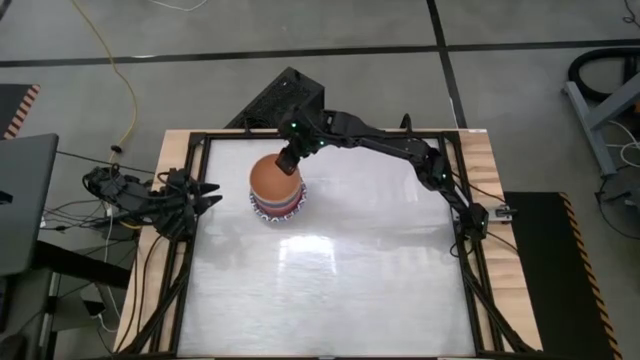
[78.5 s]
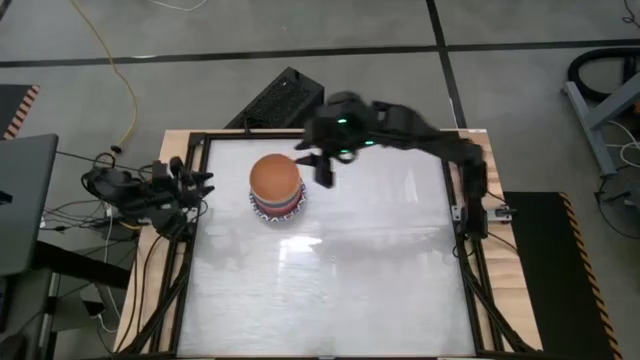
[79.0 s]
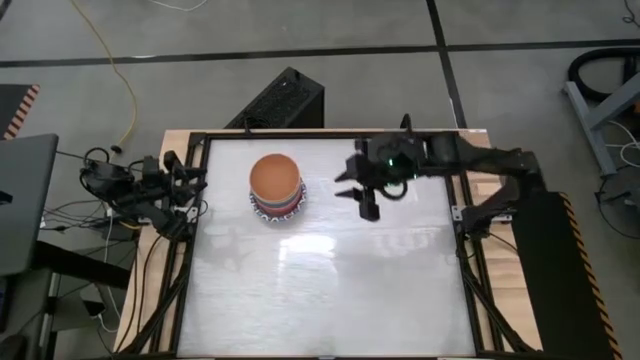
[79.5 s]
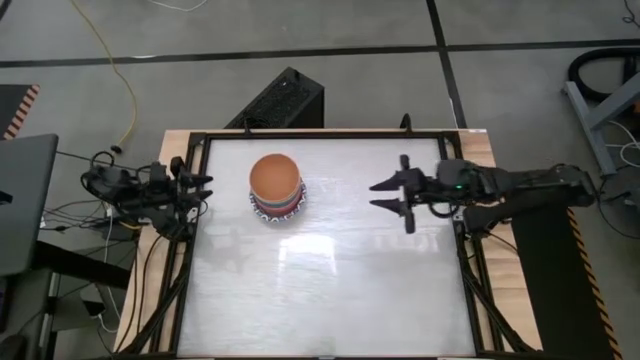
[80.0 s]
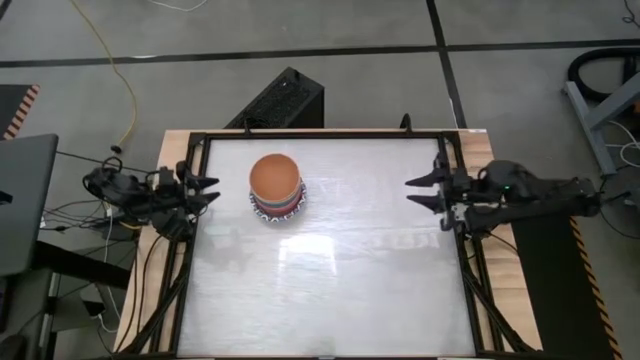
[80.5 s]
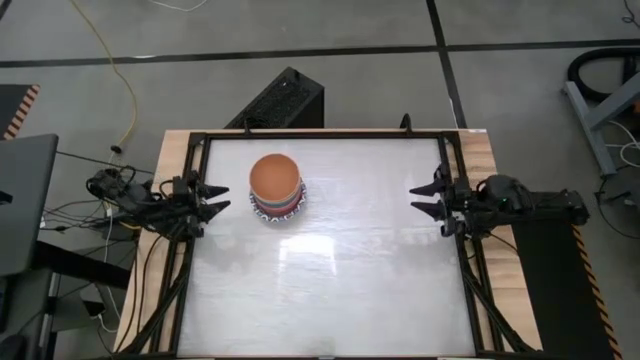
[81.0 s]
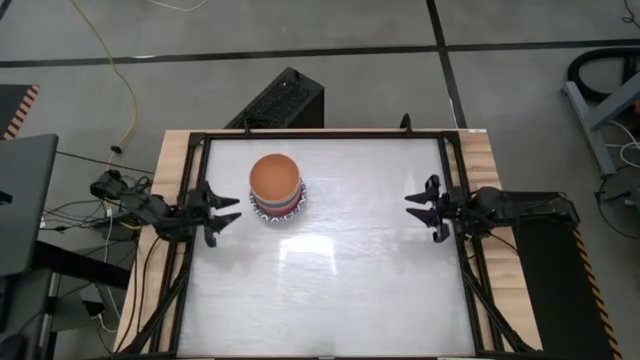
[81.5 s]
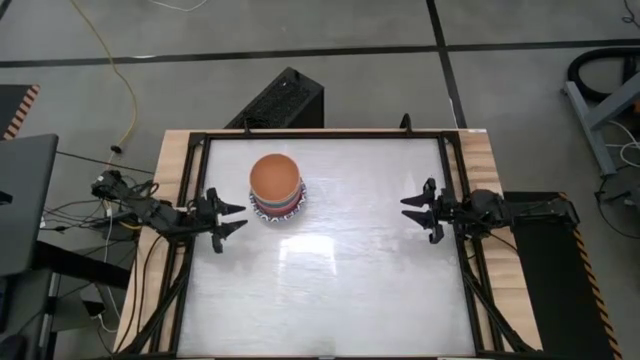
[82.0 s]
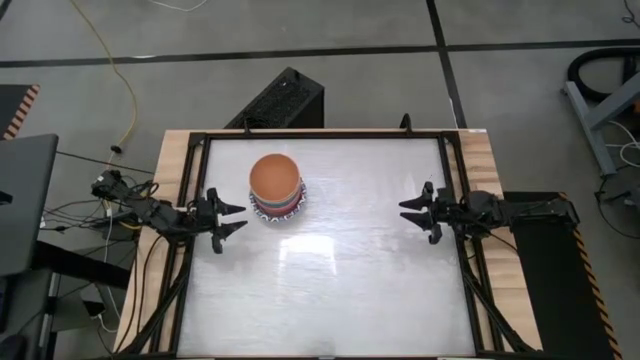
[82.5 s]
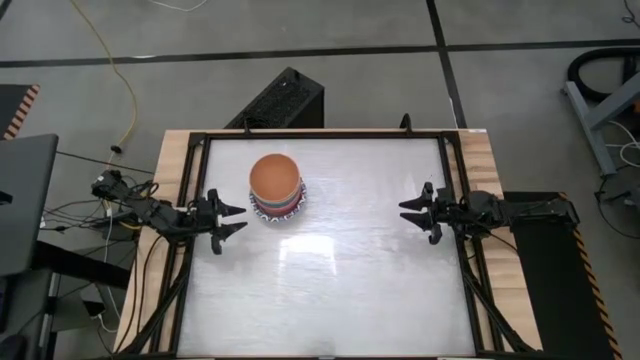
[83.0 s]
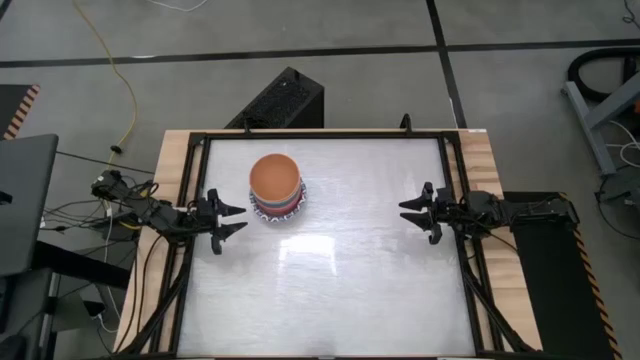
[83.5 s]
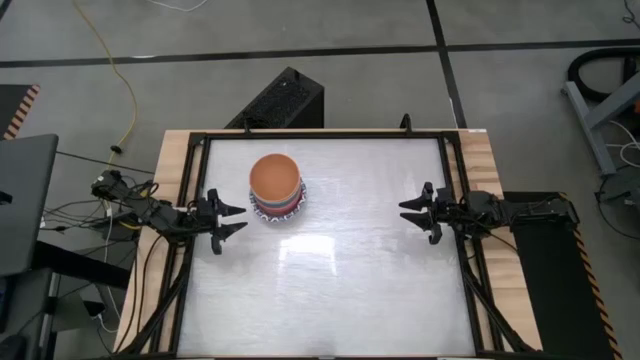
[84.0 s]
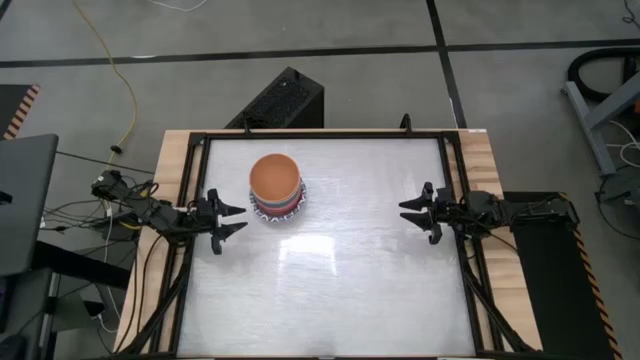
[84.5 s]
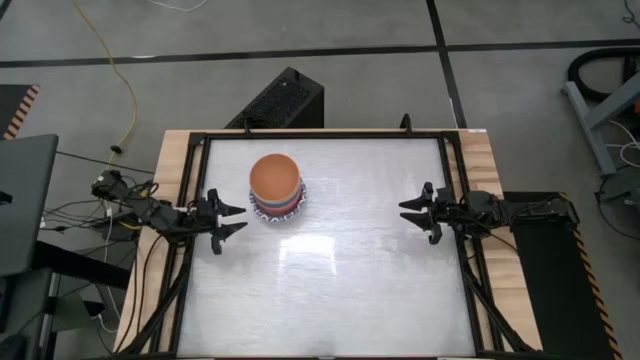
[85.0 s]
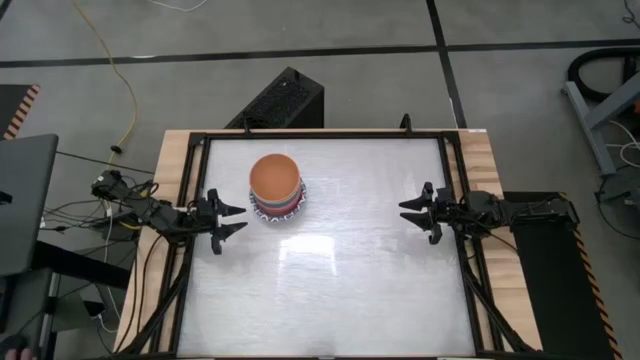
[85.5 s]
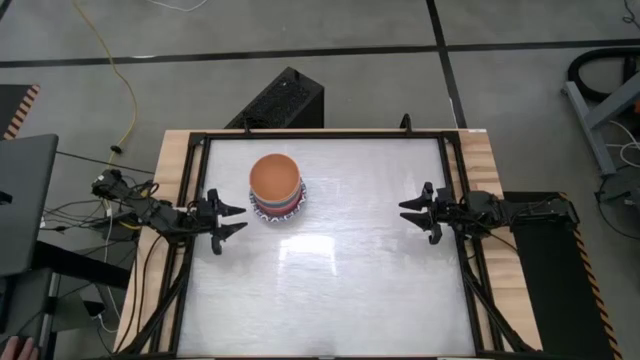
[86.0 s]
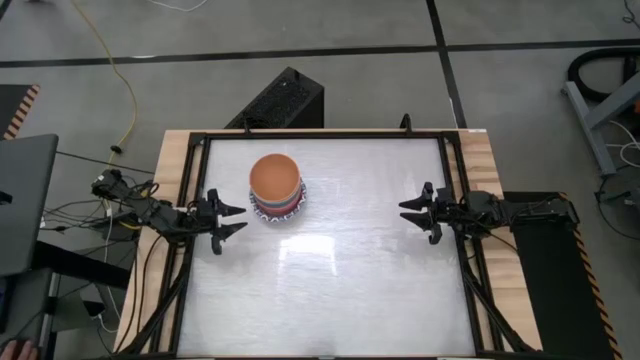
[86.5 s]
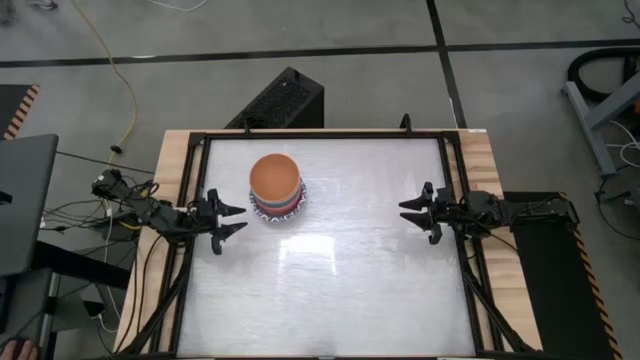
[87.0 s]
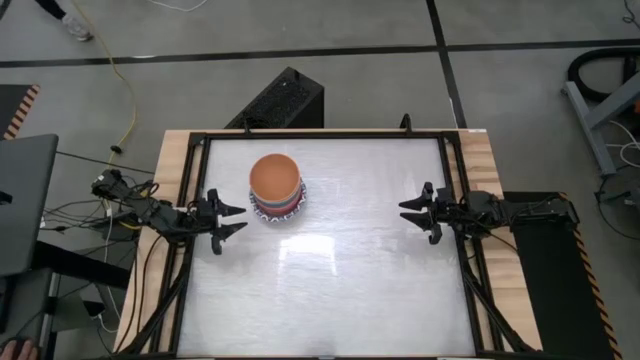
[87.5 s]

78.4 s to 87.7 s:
Return to Home Position

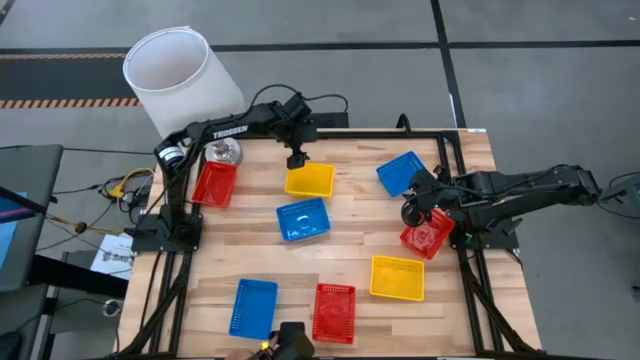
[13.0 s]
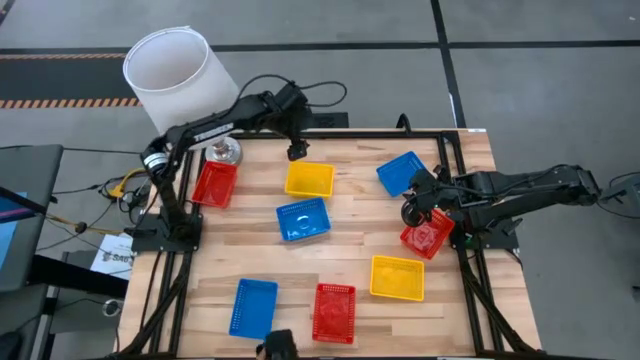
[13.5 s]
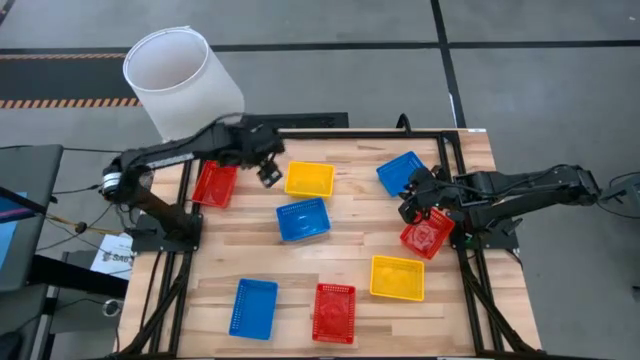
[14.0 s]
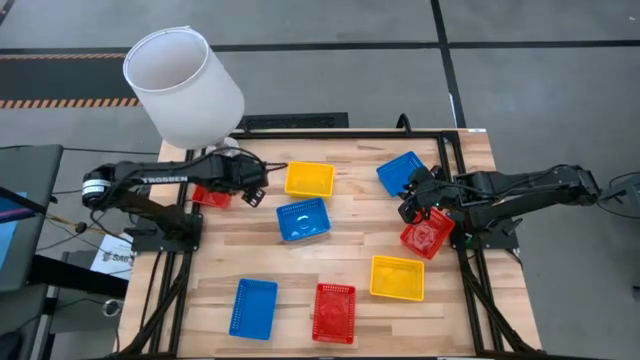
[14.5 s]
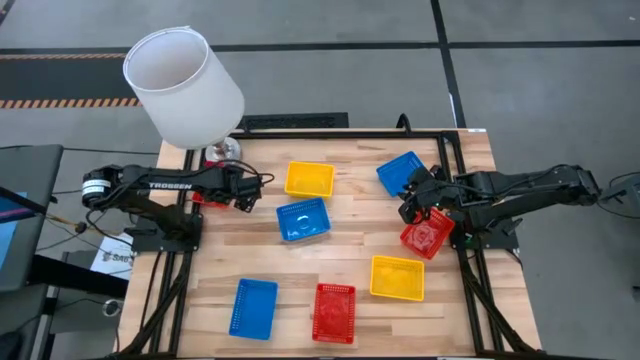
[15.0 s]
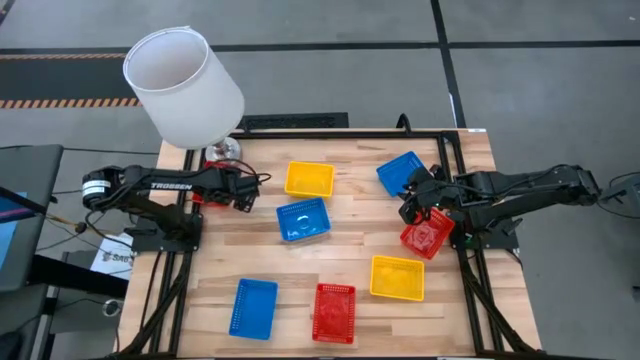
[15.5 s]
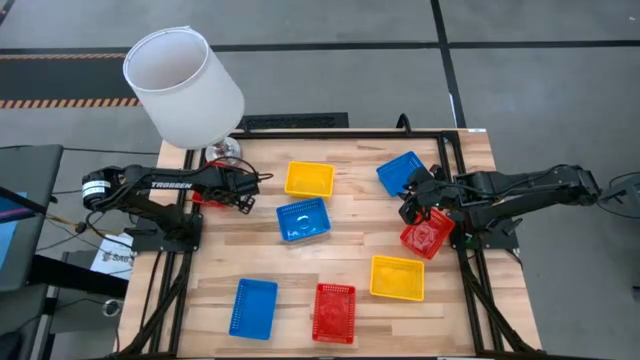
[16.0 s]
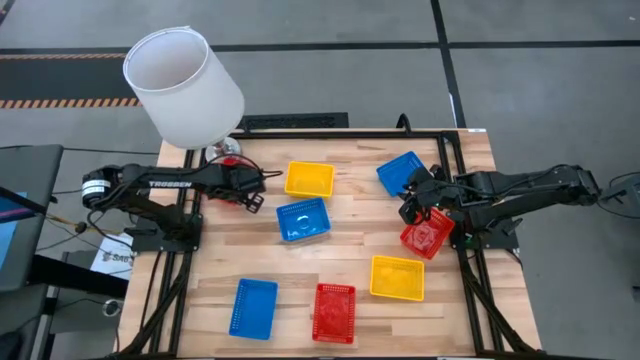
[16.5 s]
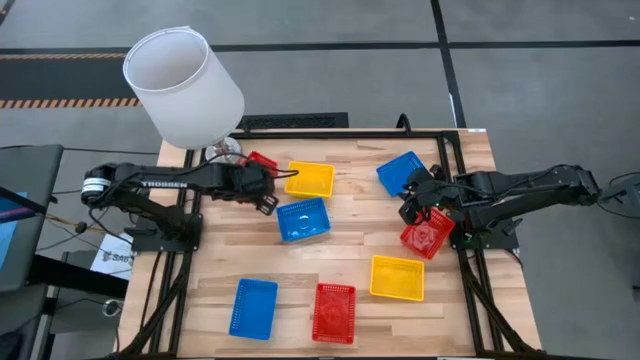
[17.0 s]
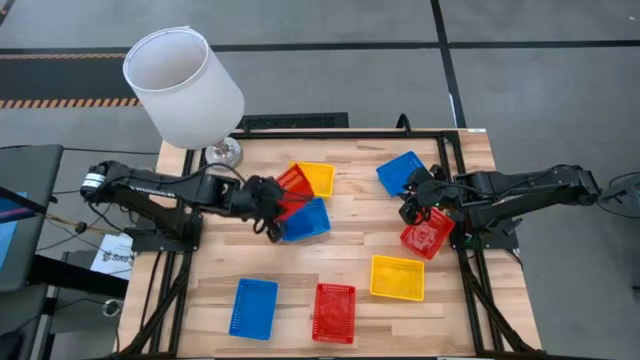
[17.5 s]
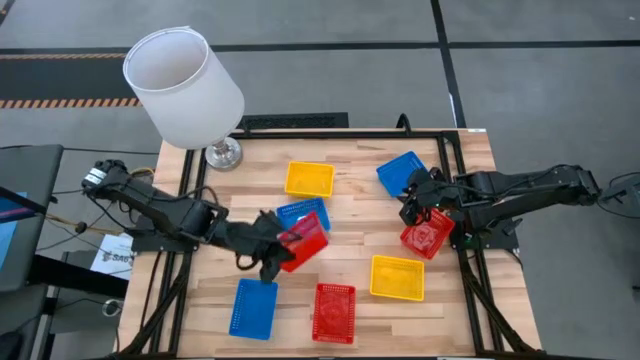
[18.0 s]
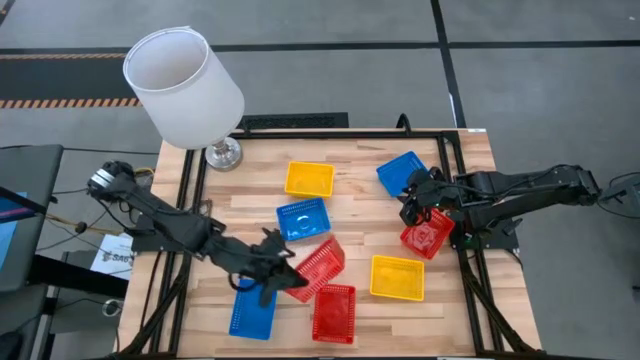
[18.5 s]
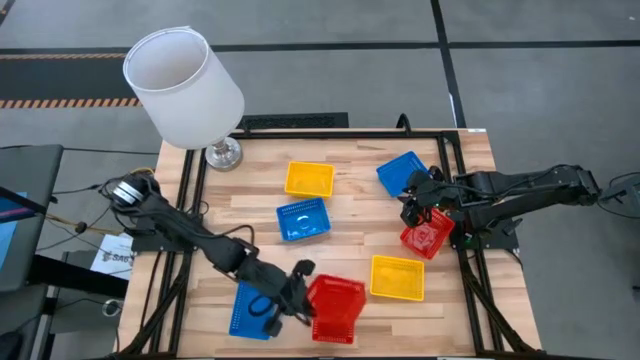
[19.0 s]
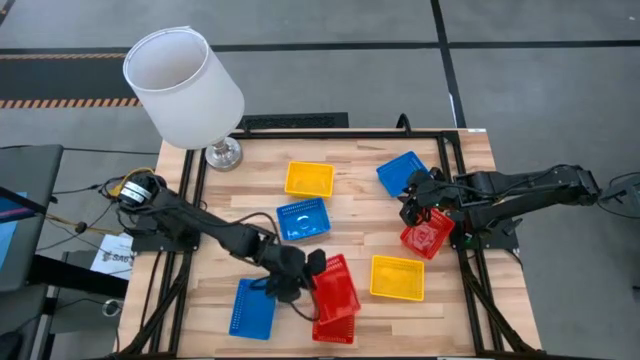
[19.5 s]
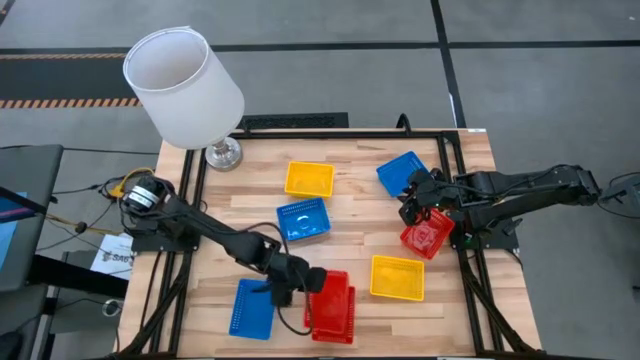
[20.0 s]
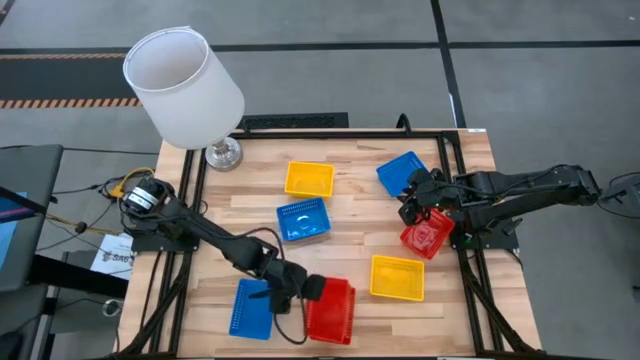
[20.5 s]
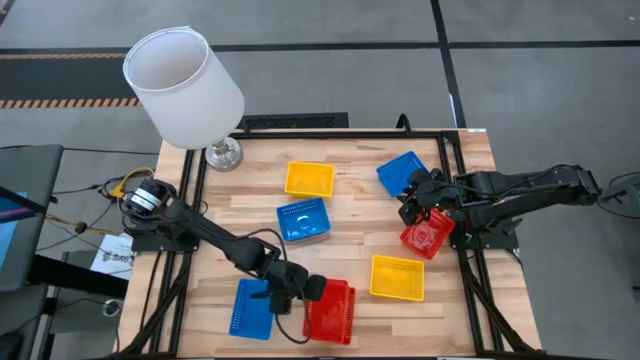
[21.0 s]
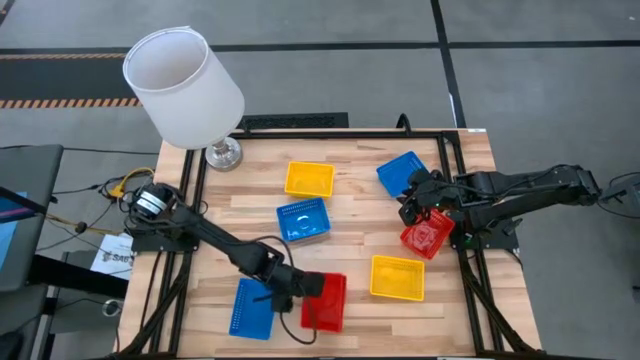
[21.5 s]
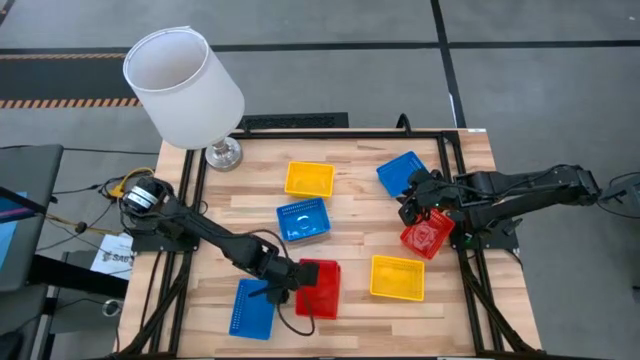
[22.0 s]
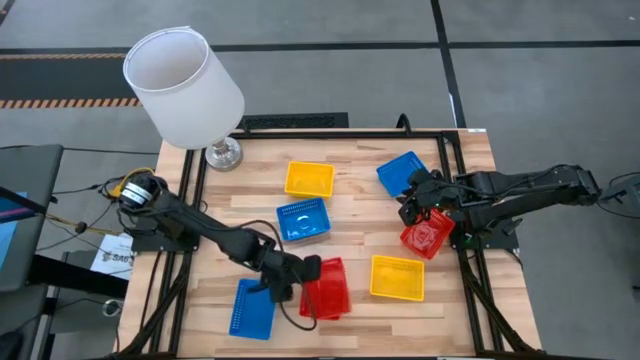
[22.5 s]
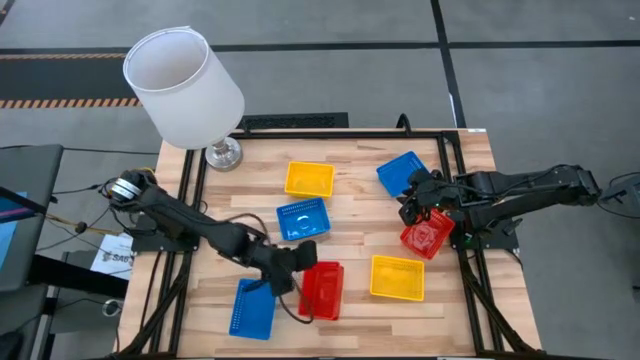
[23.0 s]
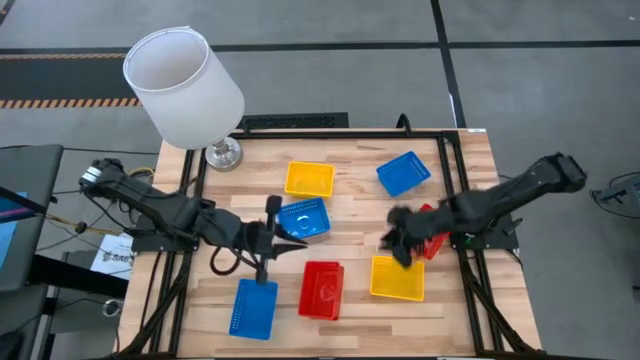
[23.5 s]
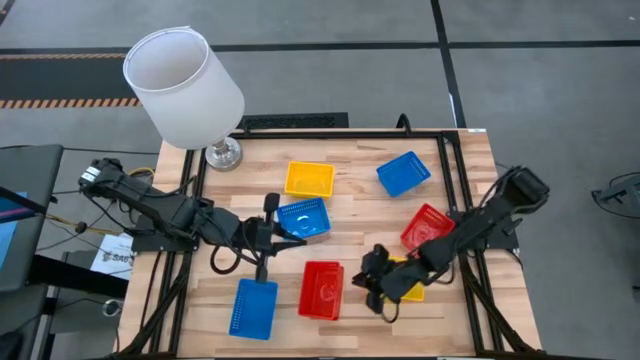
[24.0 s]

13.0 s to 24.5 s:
Stack the top left red bin on top of the bottom red bin
